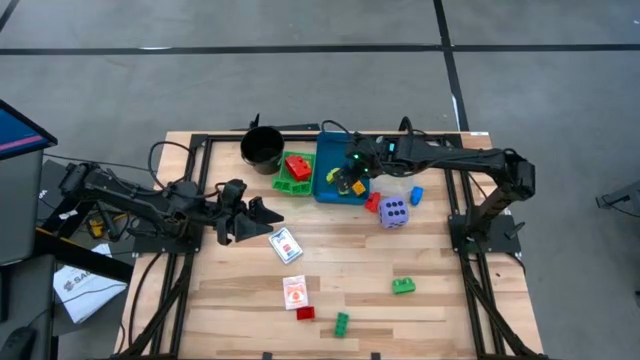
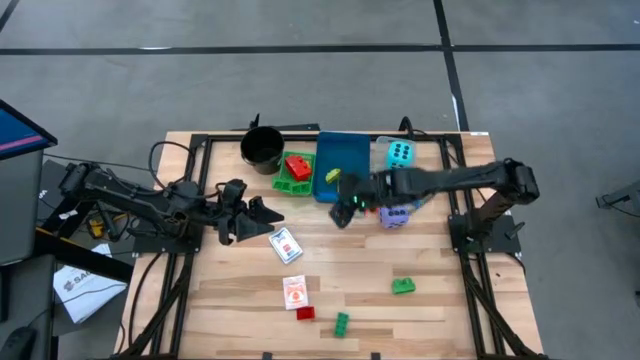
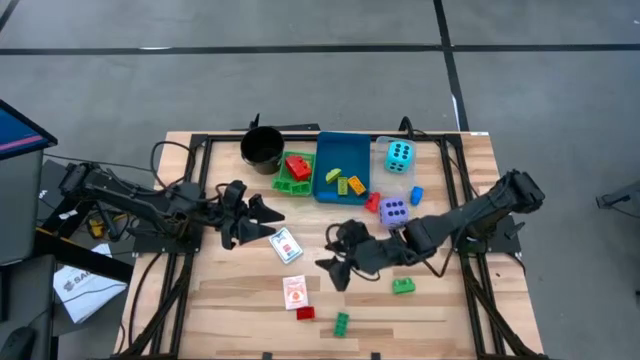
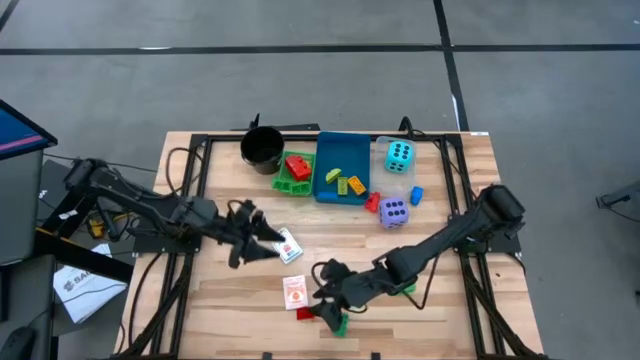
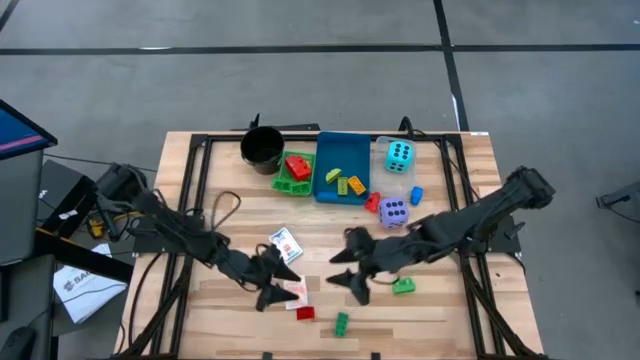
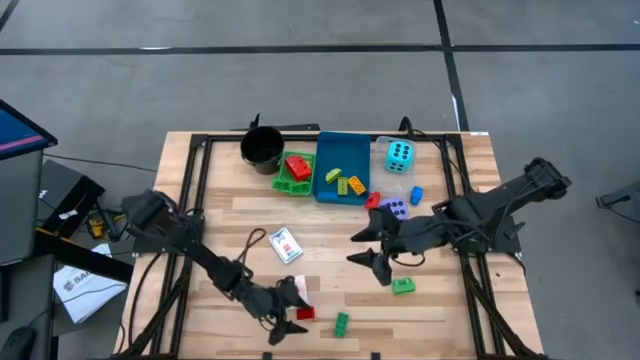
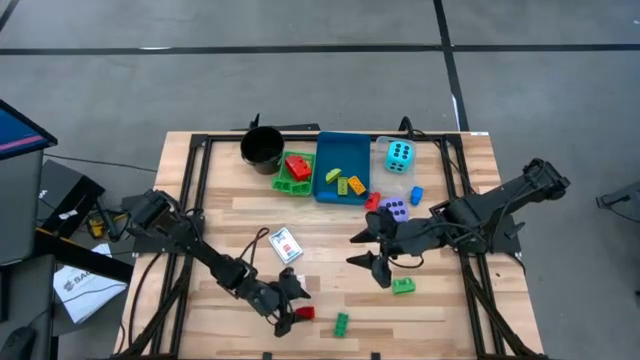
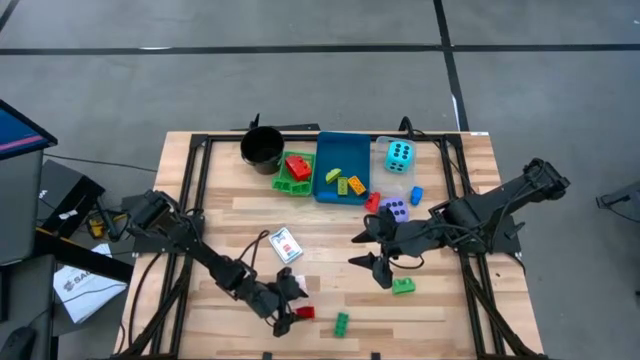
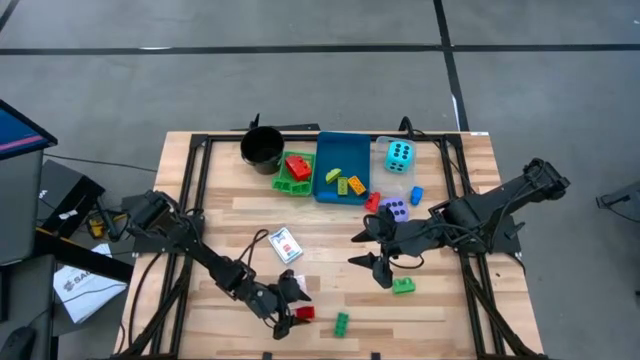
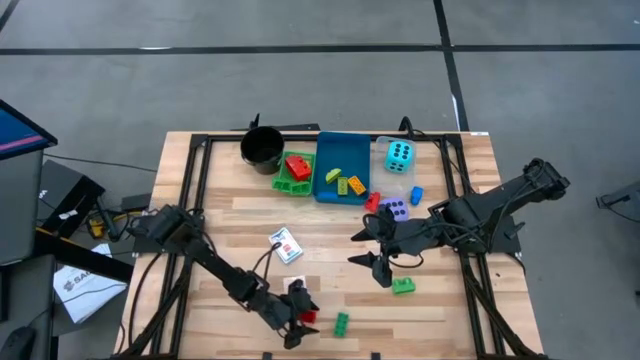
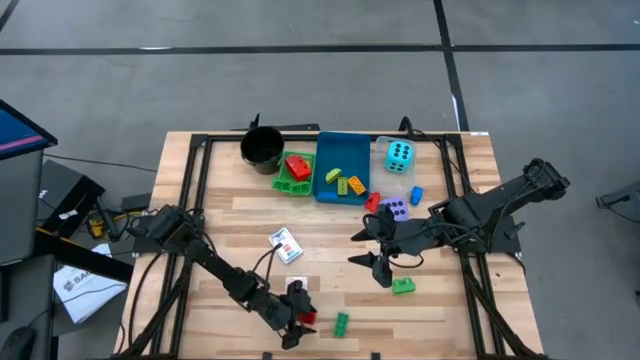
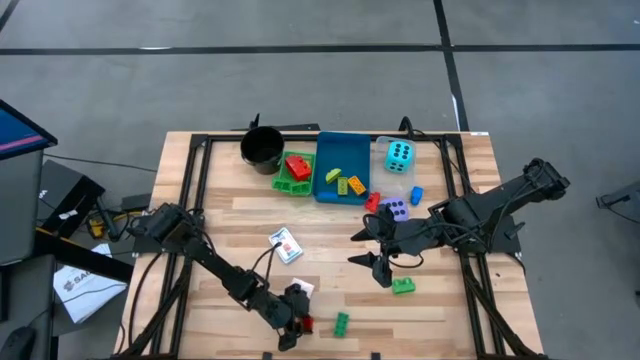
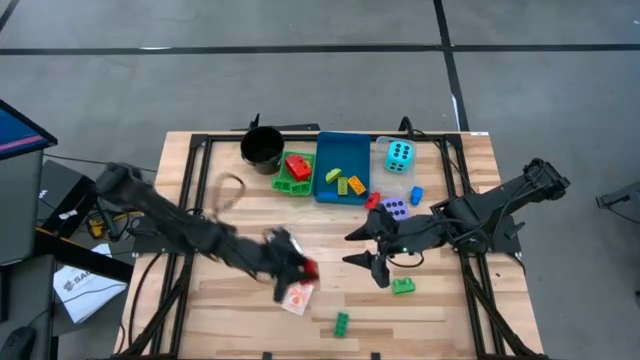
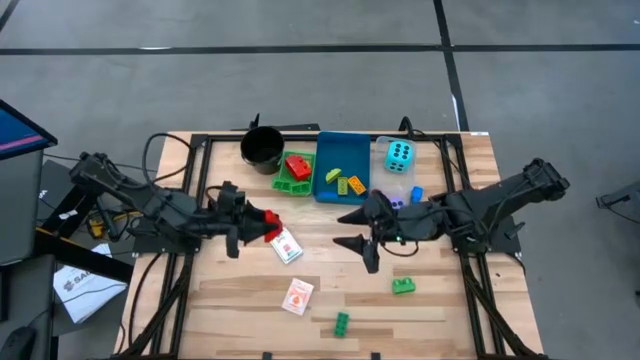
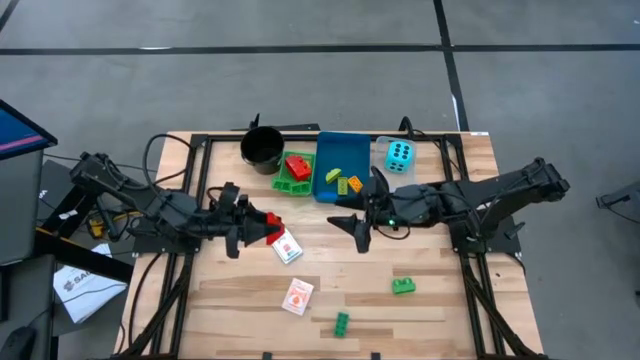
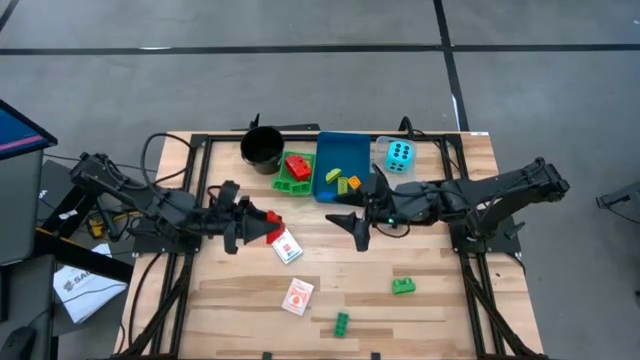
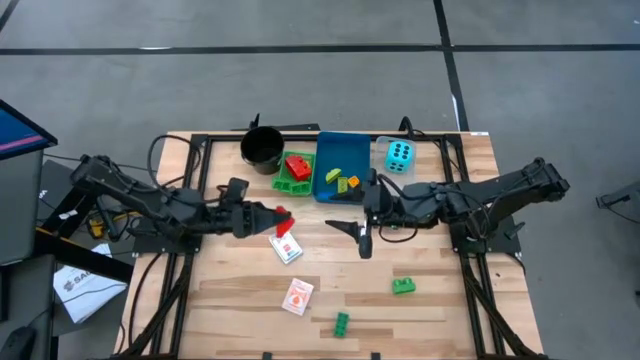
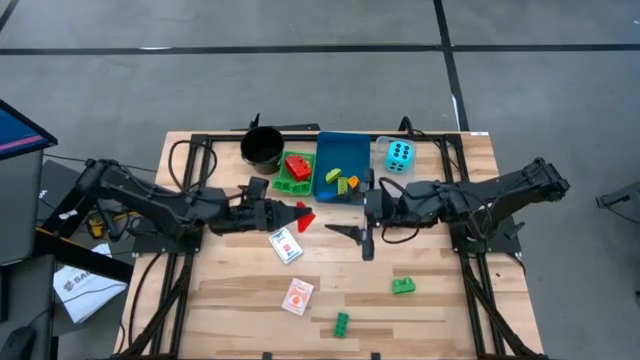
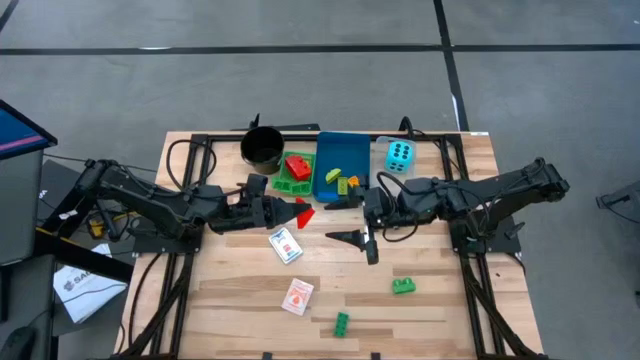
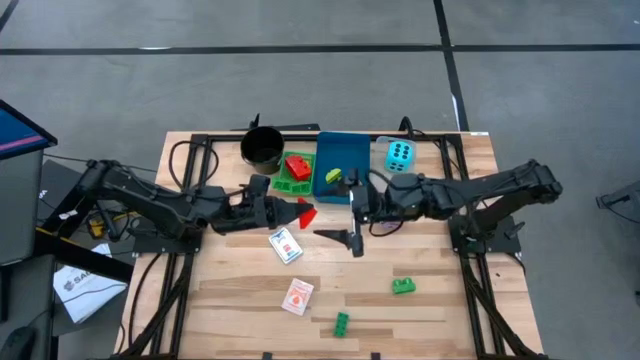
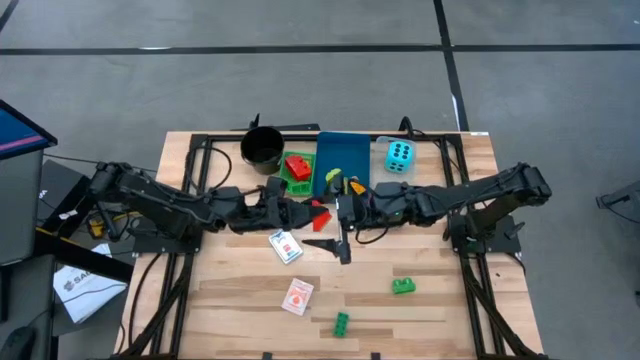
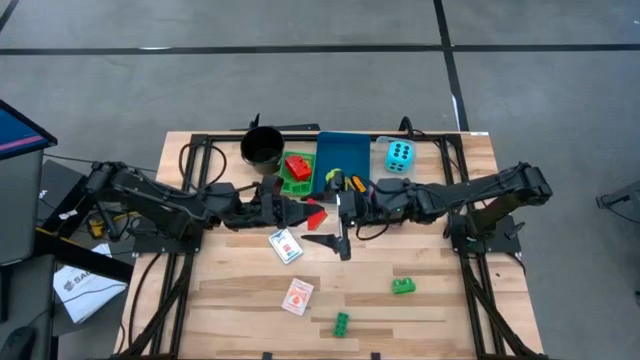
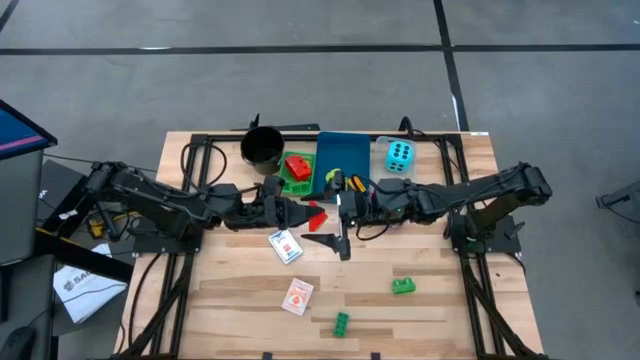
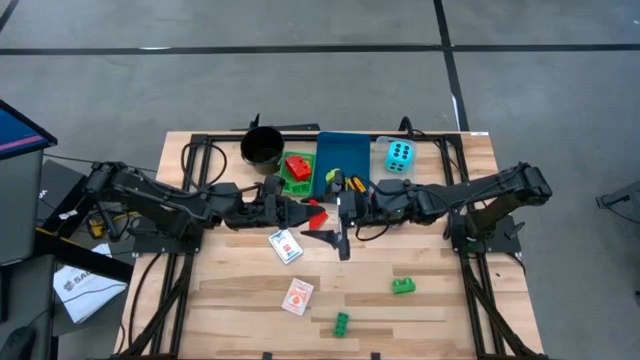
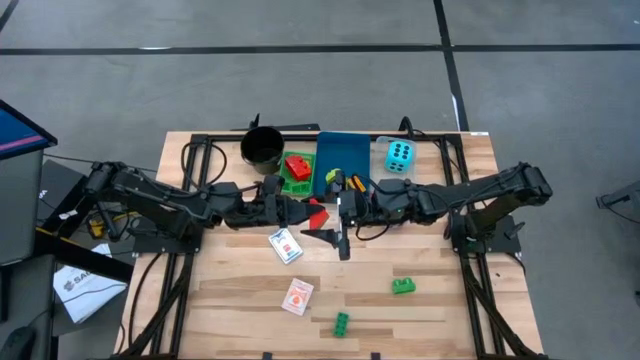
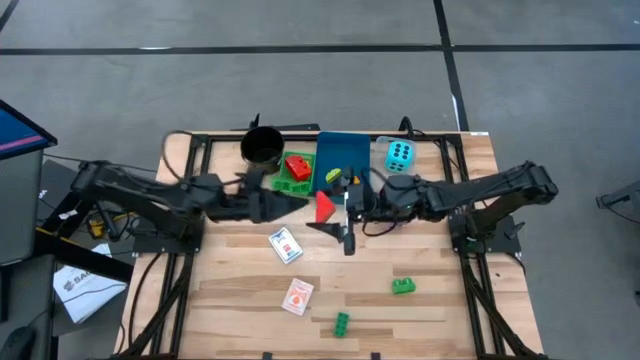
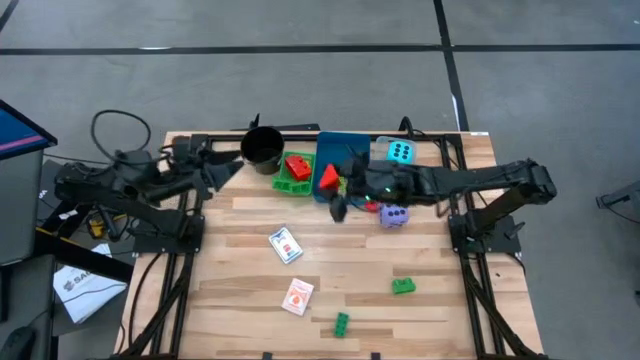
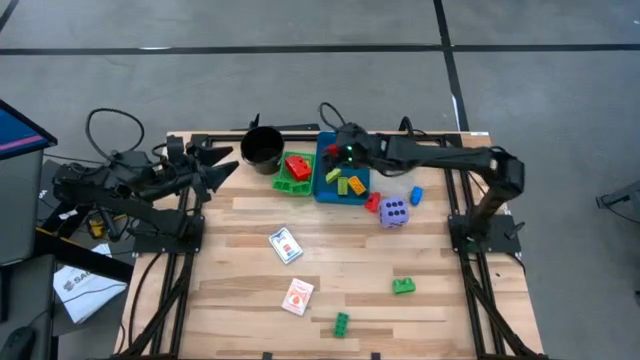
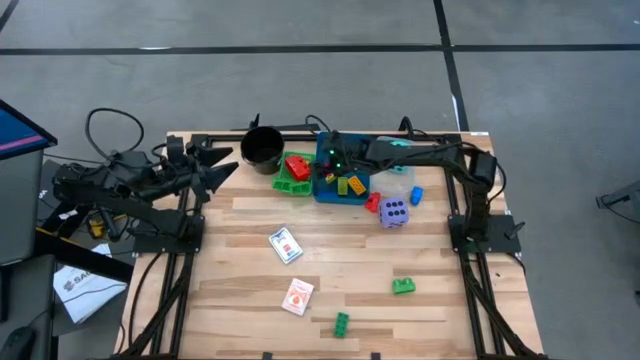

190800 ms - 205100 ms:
Task: Pick & Place Toys
Put the small stud red game piece into the blue bin
